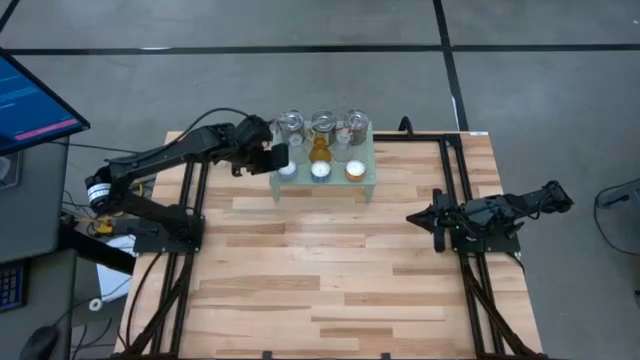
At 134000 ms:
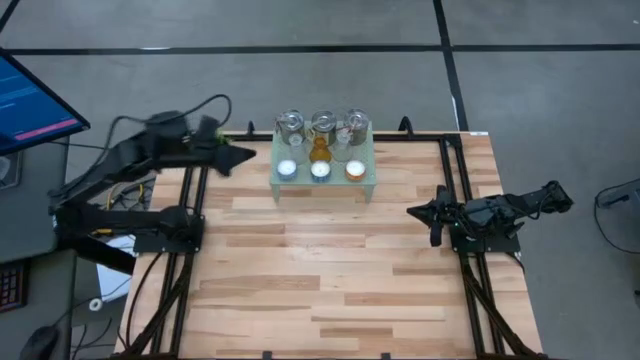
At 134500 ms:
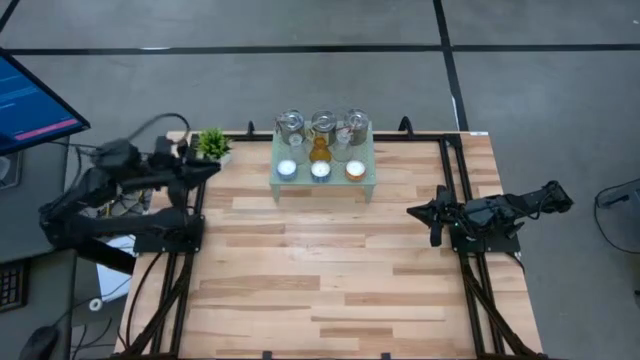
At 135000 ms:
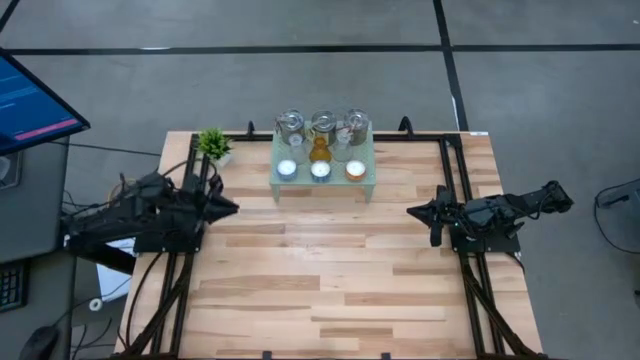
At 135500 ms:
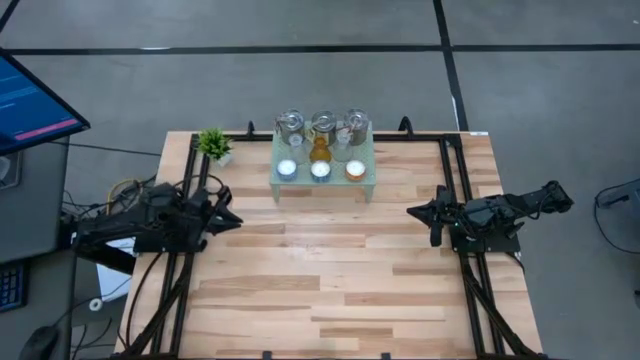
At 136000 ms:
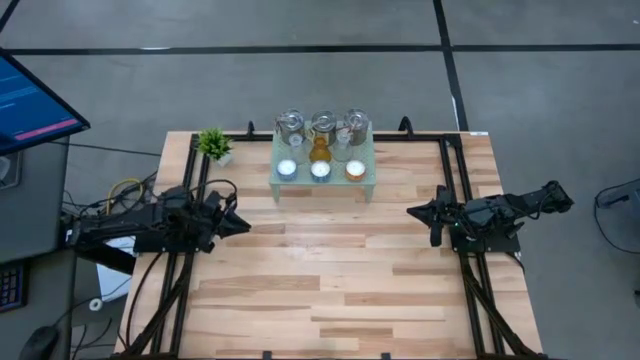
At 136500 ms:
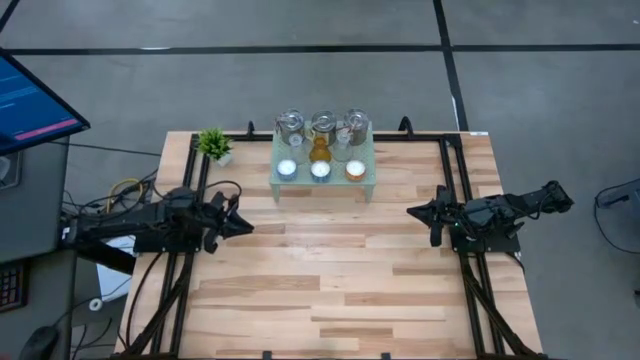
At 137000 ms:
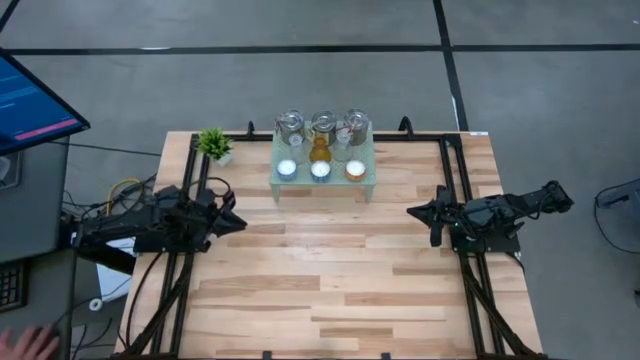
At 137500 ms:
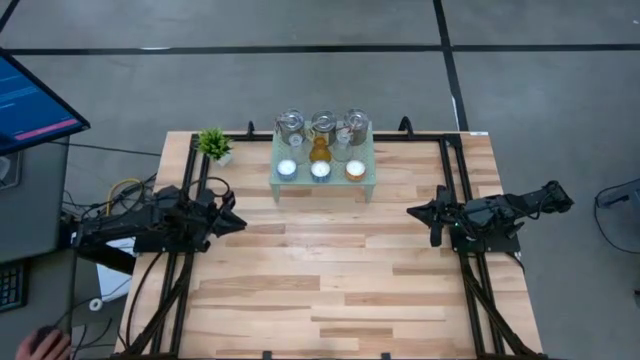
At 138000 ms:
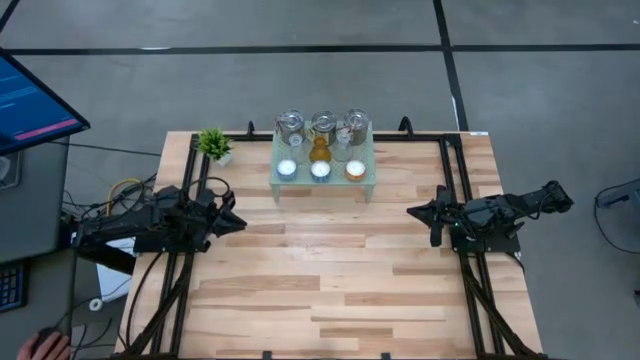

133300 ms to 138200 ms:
Task: Pick & Place candle stick holders
Return to Home Position
